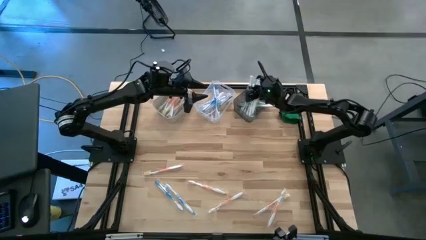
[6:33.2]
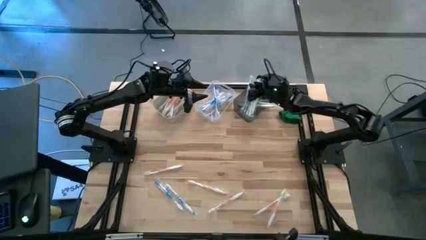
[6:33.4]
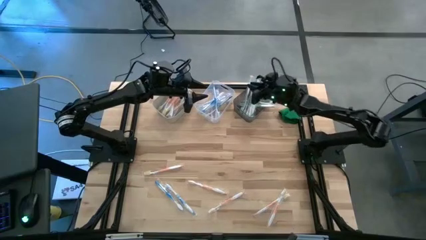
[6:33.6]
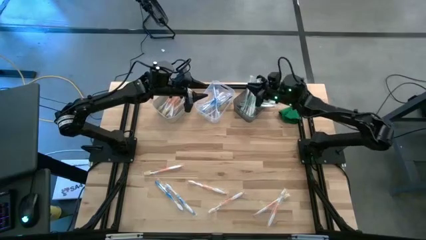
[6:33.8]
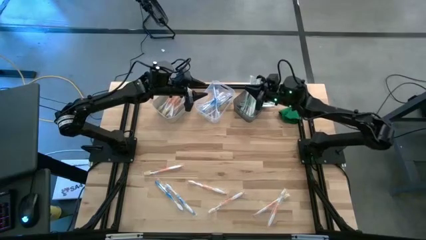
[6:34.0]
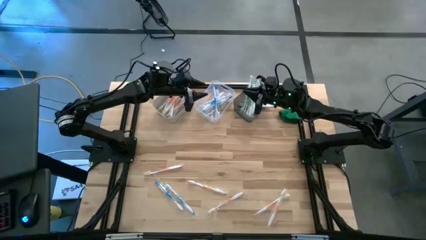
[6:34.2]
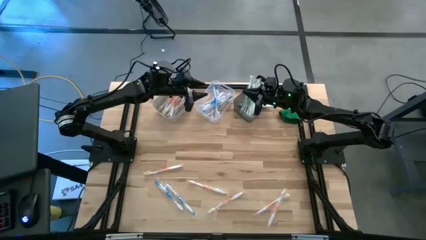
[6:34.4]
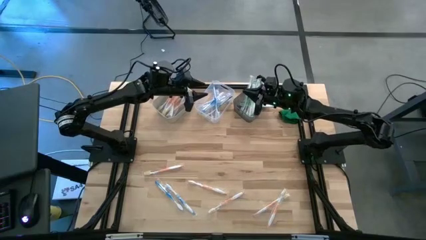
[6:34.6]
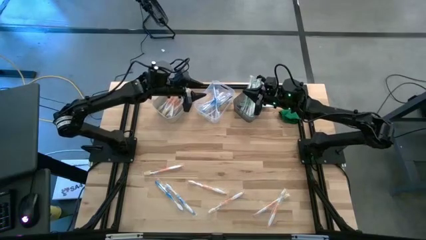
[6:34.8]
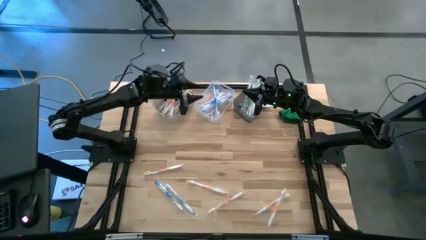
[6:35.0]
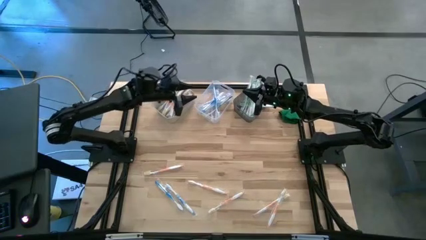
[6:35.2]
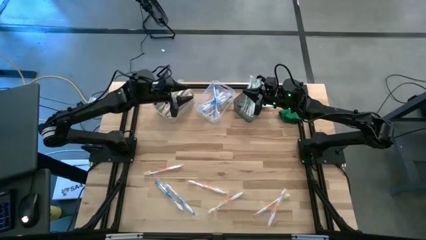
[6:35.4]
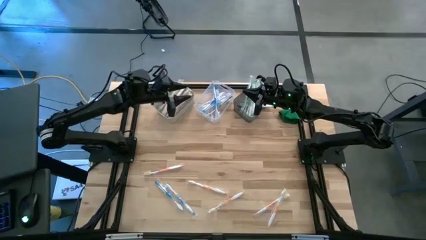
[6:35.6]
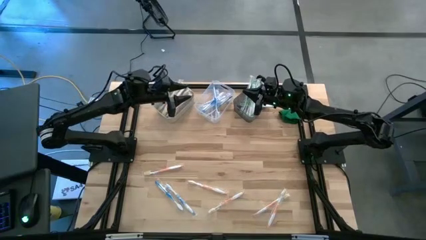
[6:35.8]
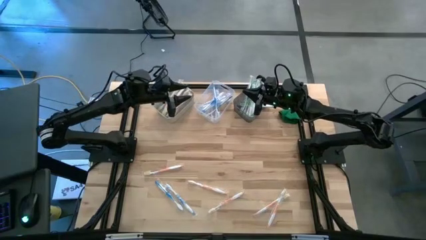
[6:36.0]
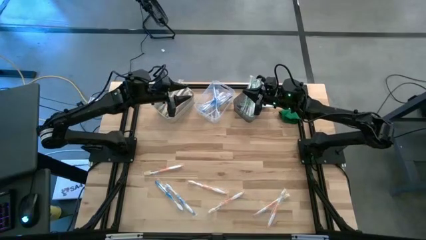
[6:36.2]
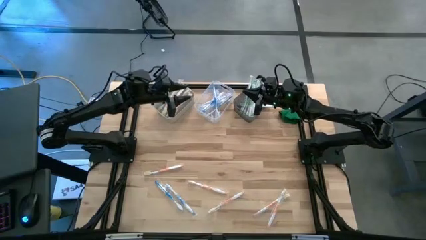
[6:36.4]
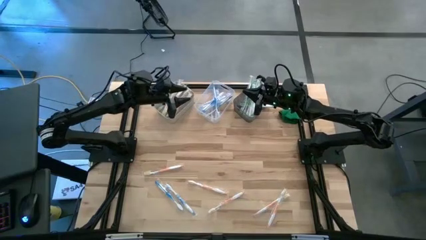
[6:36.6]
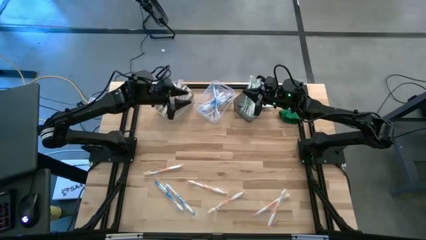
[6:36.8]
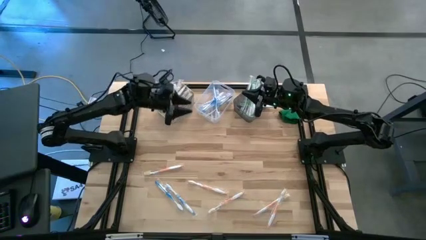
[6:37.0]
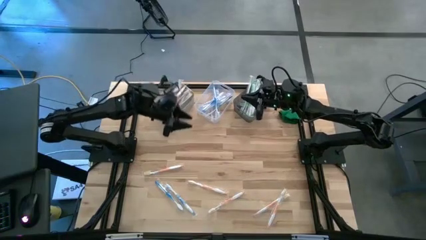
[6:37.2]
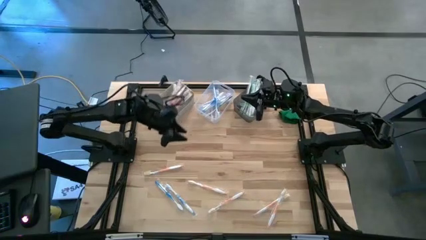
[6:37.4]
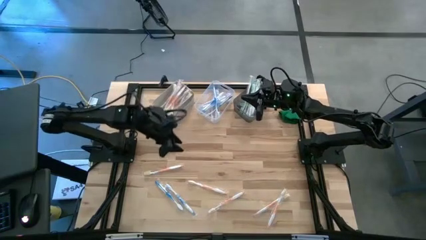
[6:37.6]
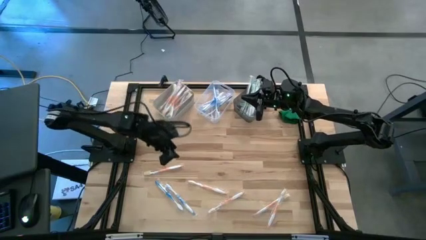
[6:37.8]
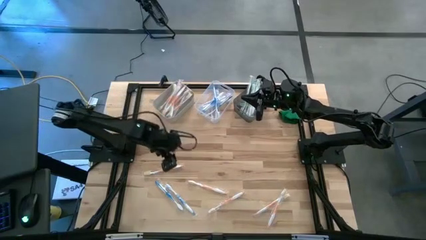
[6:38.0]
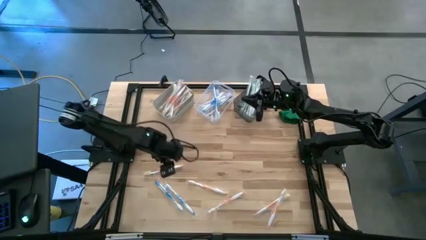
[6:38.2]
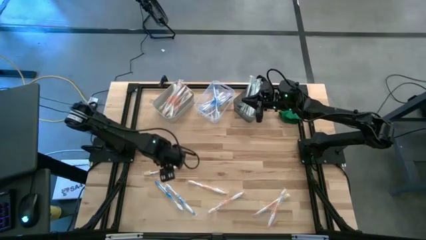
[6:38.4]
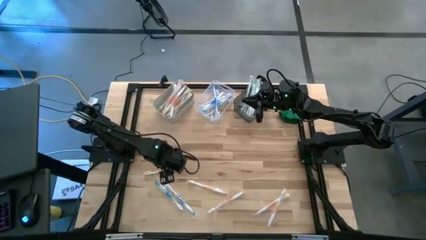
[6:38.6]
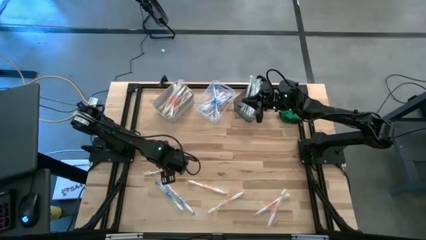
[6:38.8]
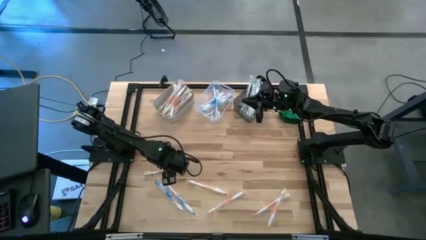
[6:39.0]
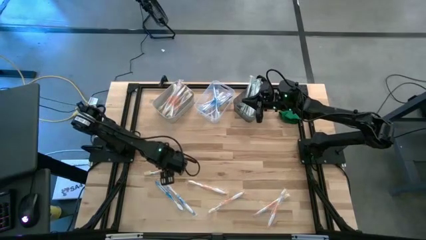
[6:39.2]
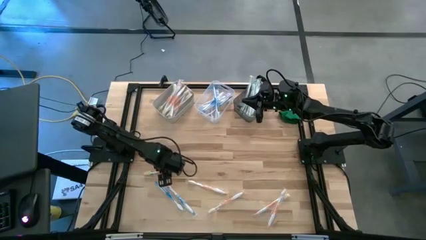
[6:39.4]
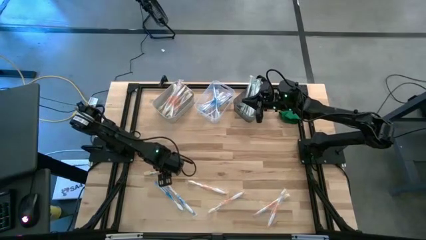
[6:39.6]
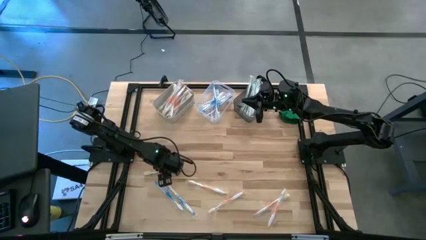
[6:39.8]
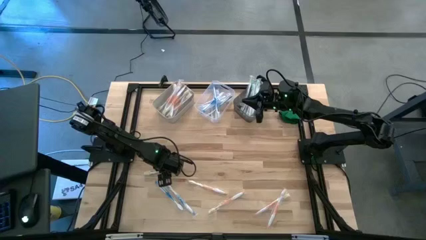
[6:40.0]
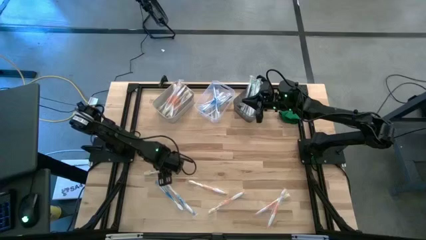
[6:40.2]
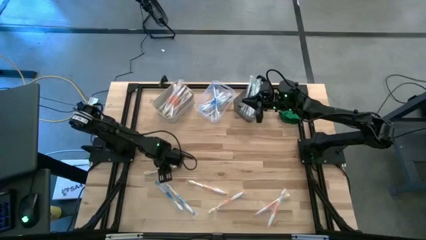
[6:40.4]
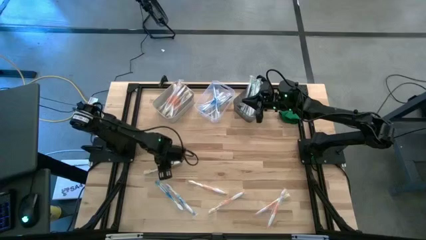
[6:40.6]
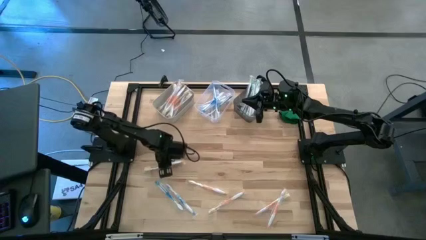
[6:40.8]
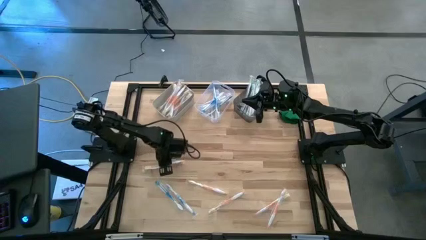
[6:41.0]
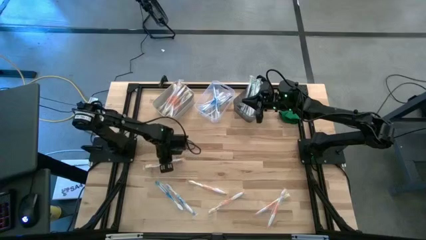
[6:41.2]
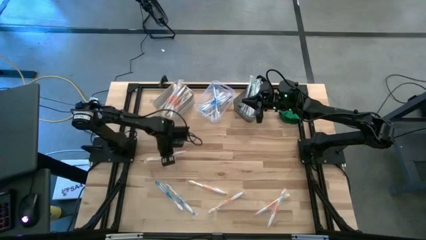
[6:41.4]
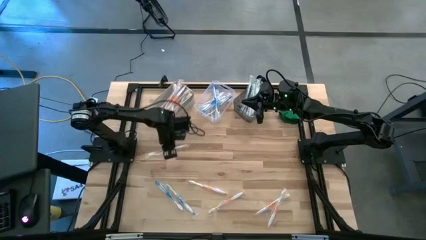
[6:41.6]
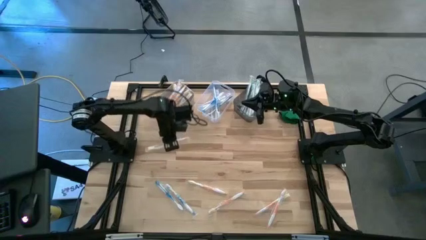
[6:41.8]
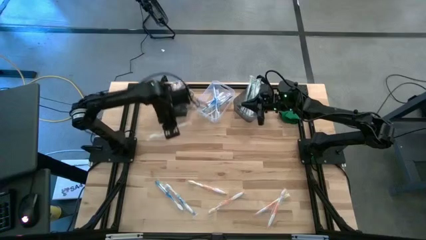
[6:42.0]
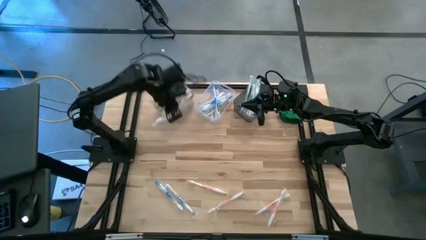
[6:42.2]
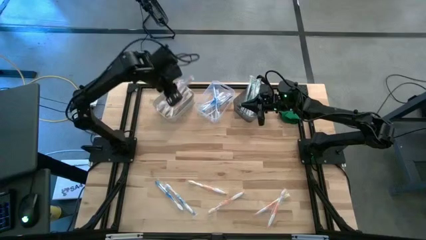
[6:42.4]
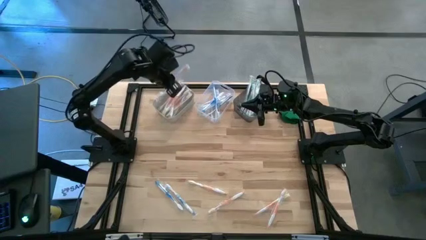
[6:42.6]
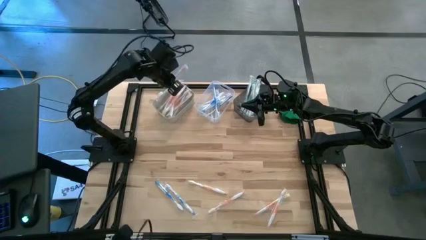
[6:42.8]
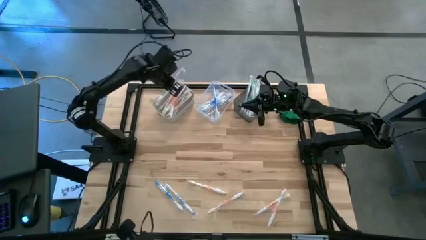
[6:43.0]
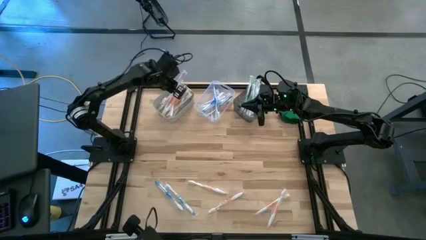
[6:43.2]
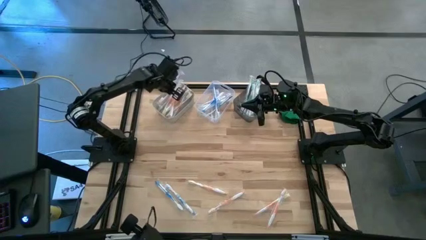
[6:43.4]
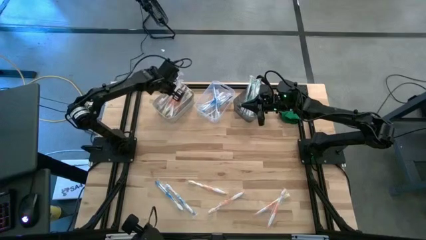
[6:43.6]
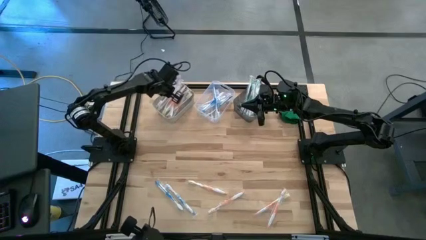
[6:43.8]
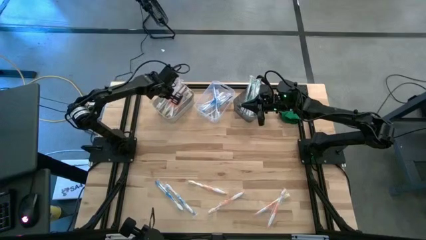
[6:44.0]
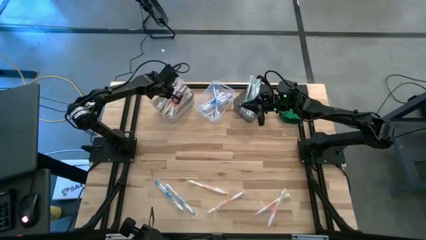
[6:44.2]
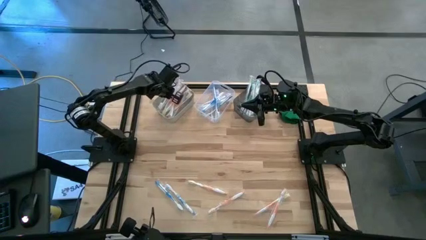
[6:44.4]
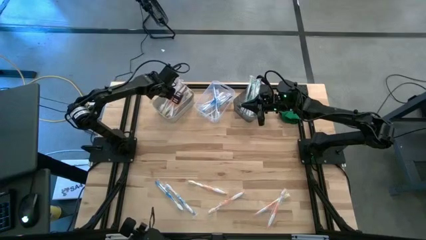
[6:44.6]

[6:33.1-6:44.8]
Task: Pick & Place Toothbrushes
Put the orange toothbrush into the white bin

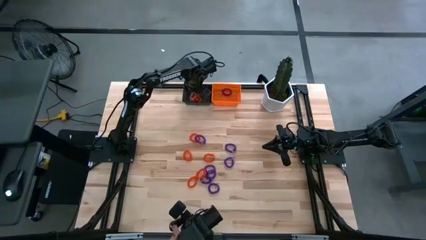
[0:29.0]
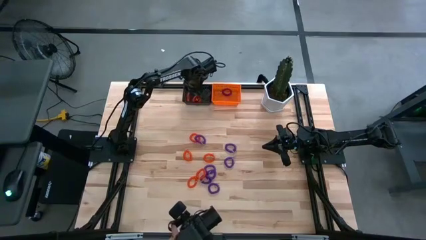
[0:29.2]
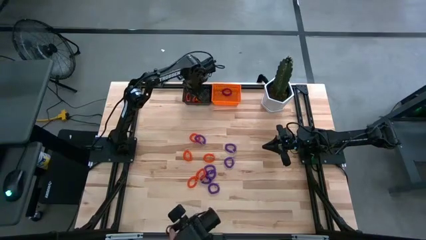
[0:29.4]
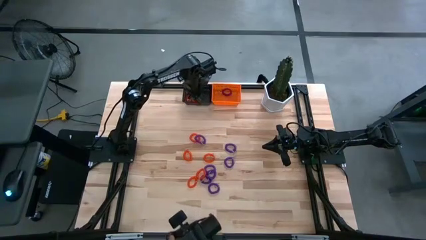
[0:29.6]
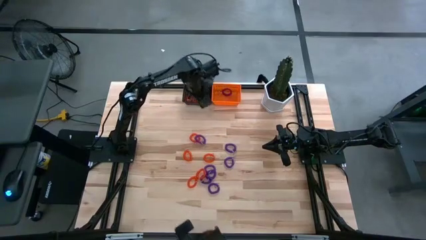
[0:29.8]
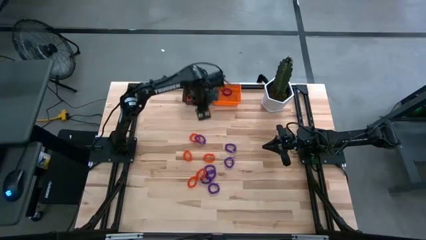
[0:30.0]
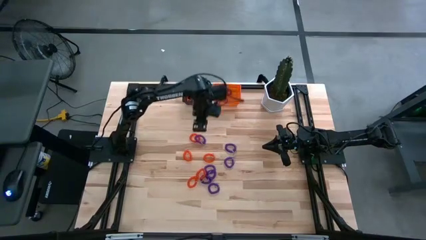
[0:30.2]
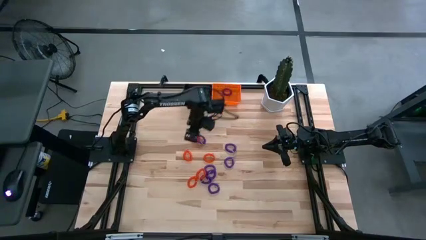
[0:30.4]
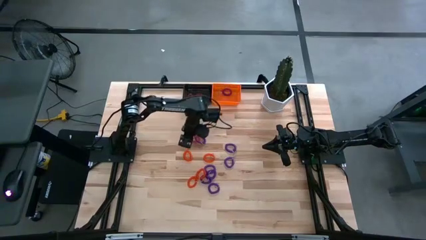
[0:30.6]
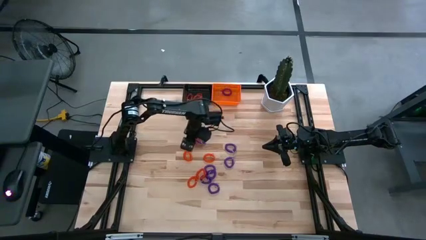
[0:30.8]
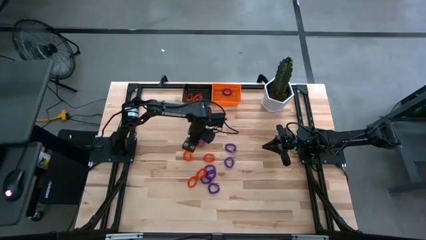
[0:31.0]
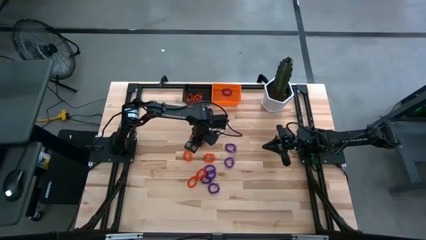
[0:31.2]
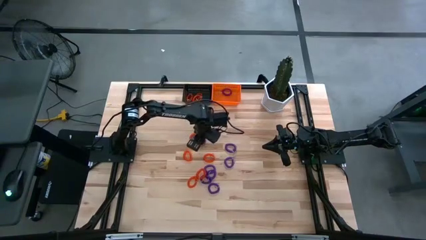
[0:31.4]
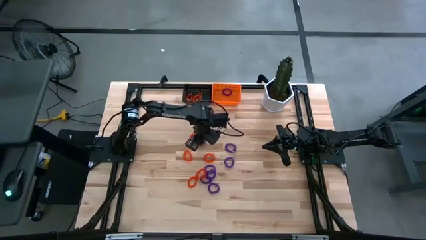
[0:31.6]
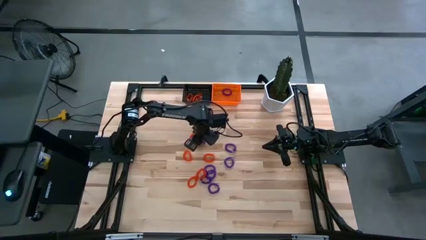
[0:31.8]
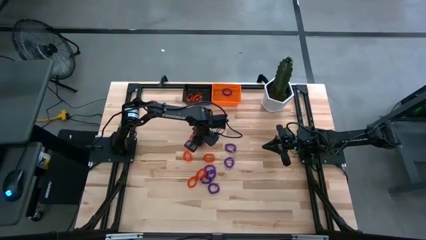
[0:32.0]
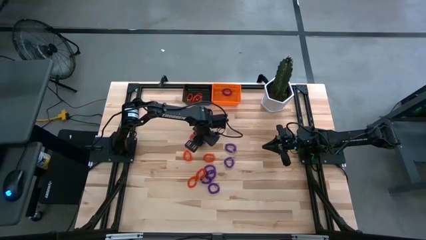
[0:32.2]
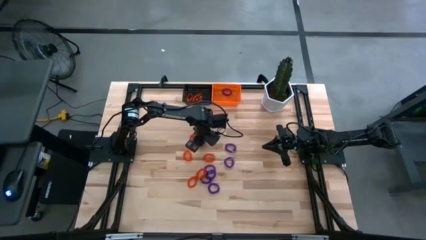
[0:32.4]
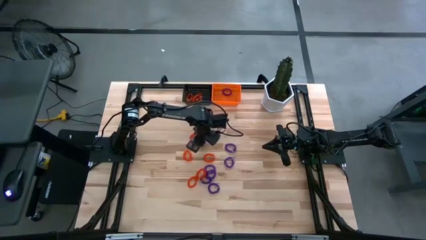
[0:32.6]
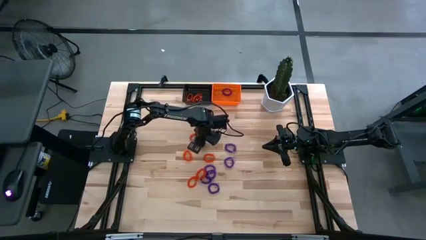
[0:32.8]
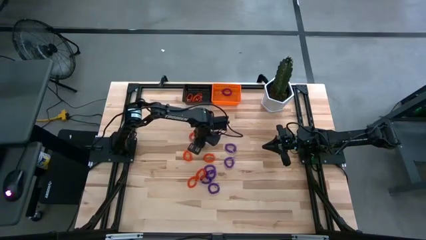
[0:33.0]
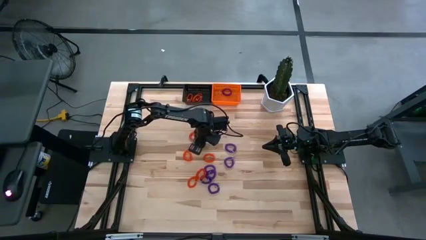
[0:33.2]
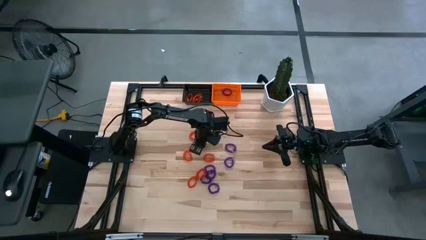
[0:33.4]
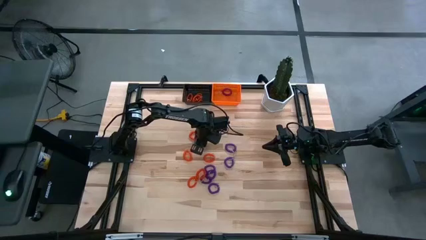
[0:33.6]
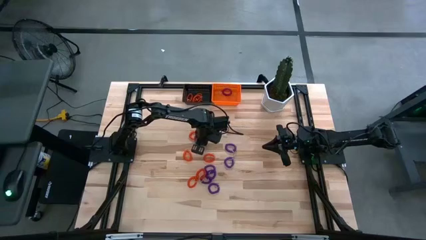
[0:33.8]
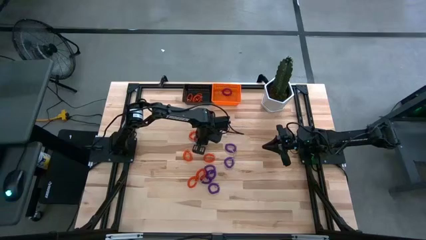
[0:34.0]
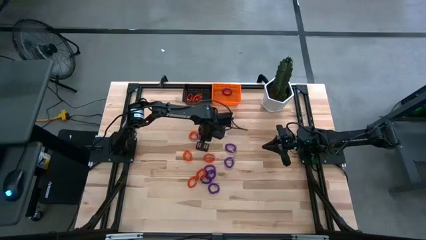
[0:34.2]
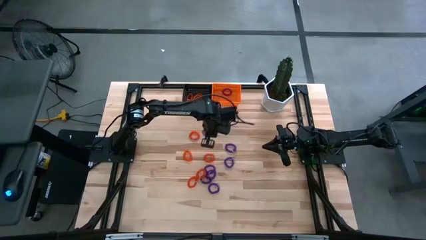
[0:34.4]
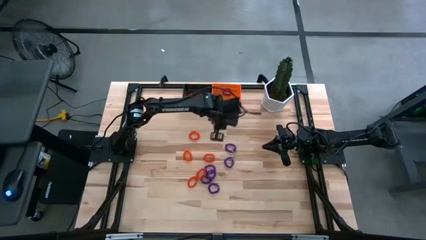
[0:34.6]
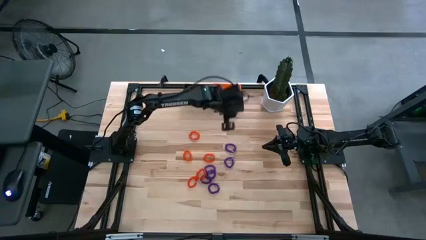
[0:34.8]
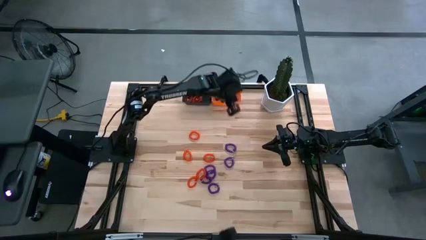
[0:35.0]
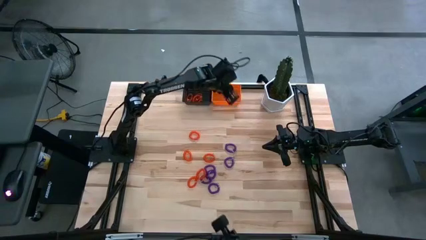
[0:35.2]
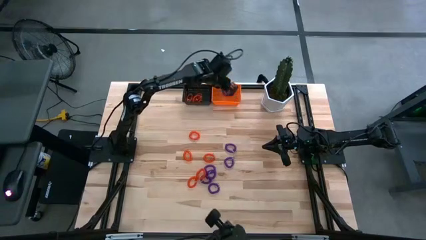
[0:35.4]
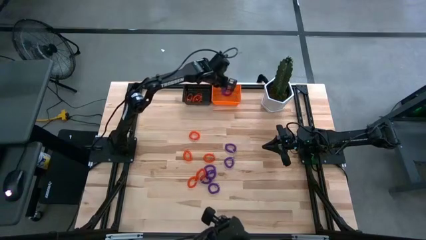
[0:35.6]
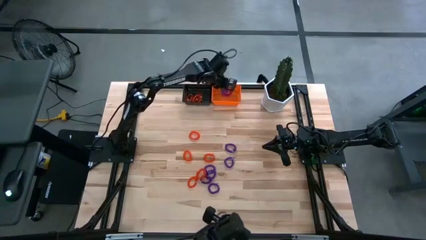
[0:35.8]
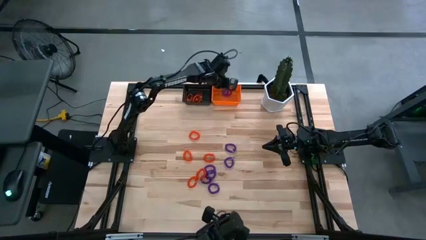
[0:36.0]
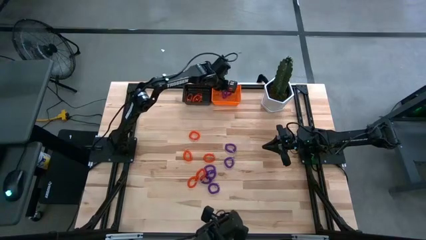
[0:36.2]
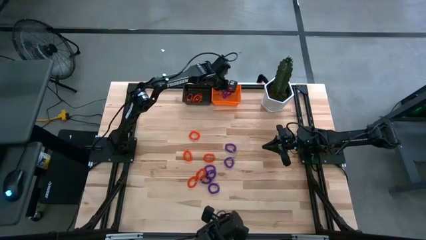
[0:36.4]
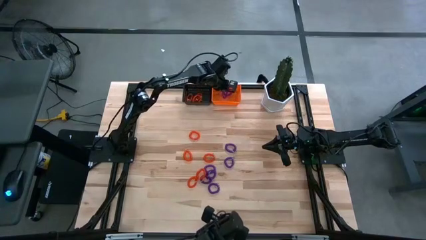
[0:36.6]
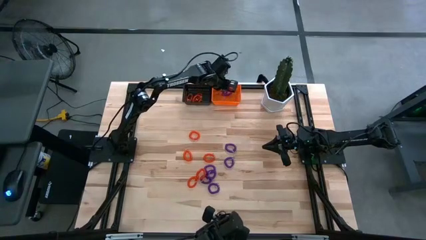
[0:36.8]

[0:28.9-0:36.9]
Task: Sort spring keychains into baskets
Put the violet spring keychain into the orange basket
